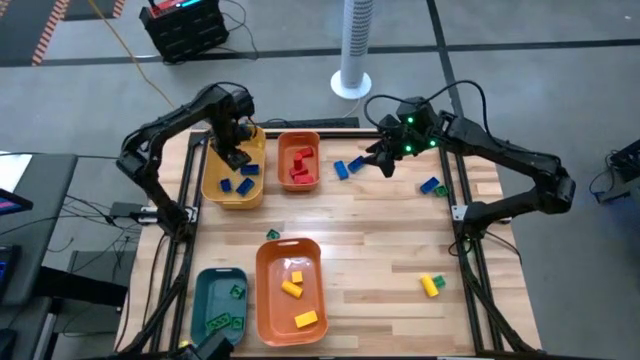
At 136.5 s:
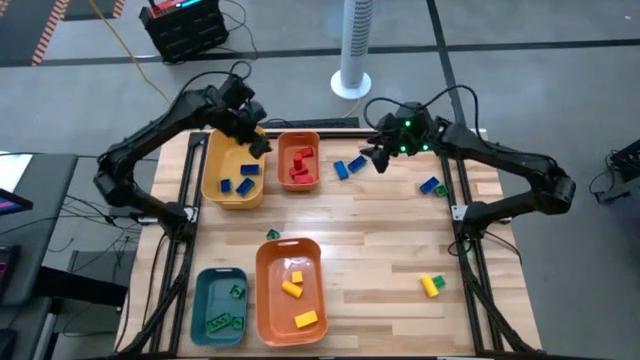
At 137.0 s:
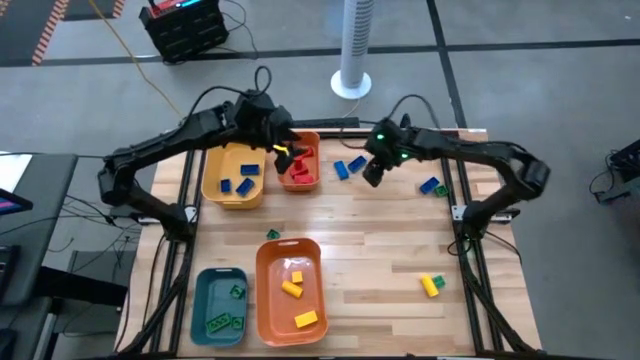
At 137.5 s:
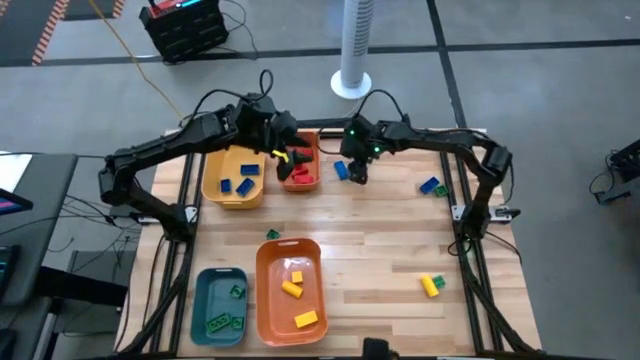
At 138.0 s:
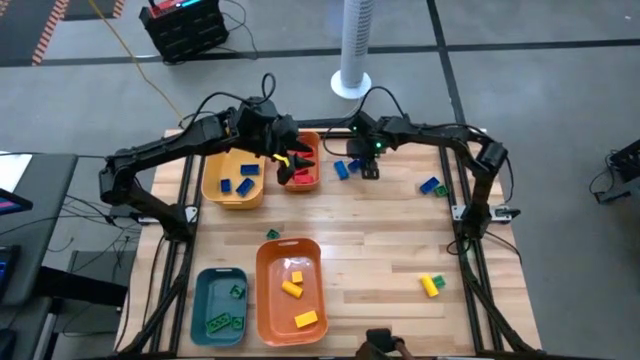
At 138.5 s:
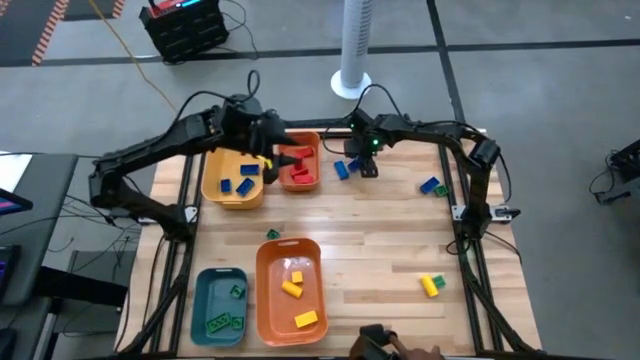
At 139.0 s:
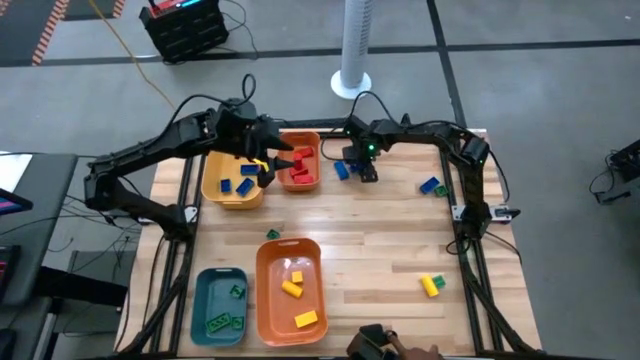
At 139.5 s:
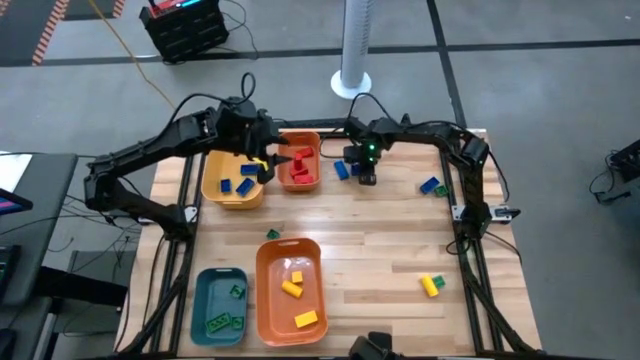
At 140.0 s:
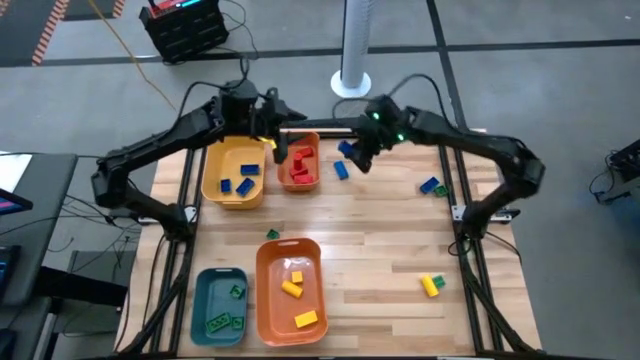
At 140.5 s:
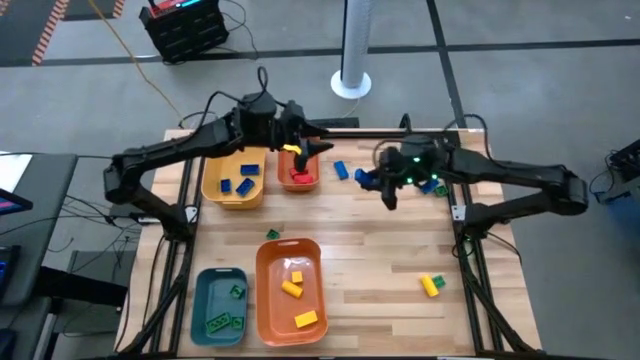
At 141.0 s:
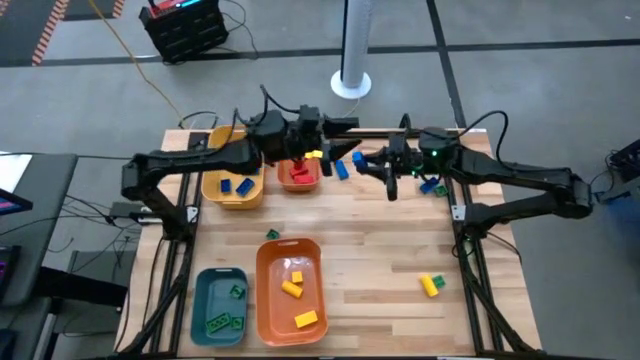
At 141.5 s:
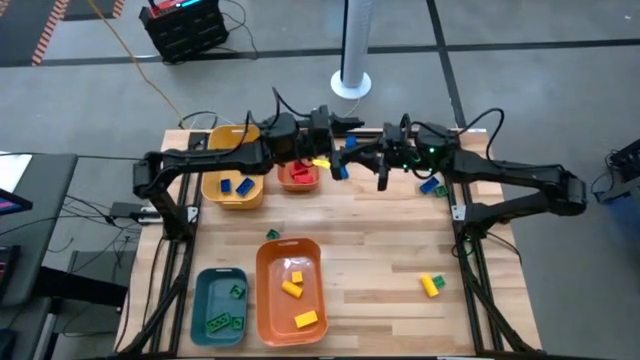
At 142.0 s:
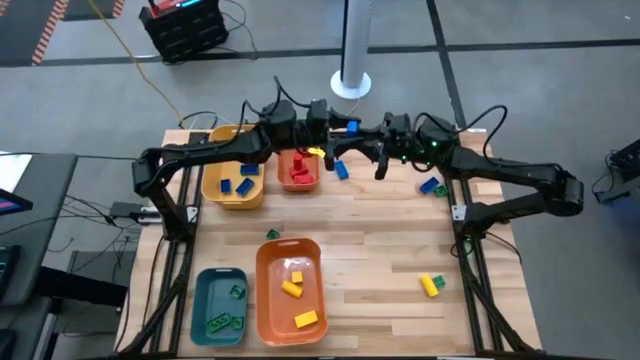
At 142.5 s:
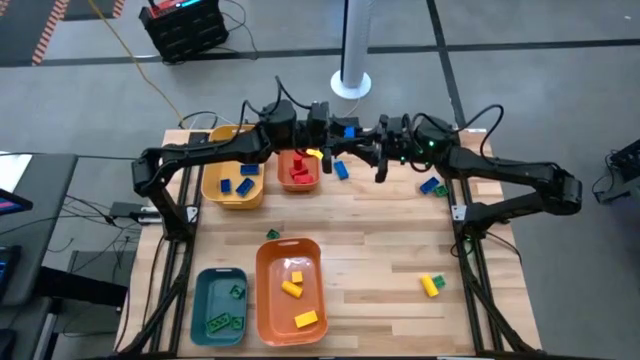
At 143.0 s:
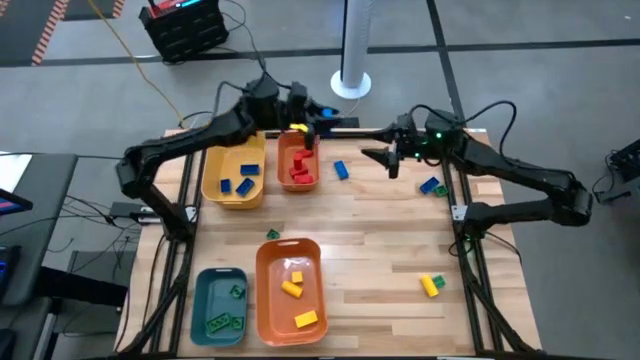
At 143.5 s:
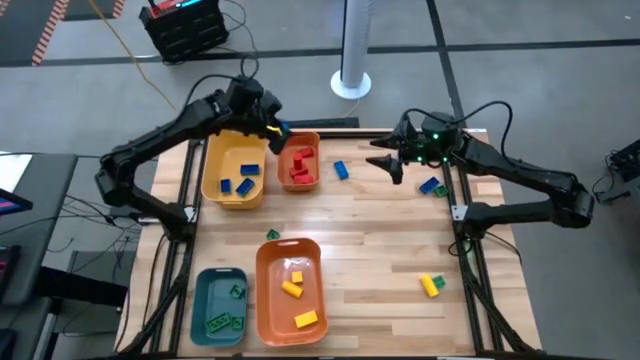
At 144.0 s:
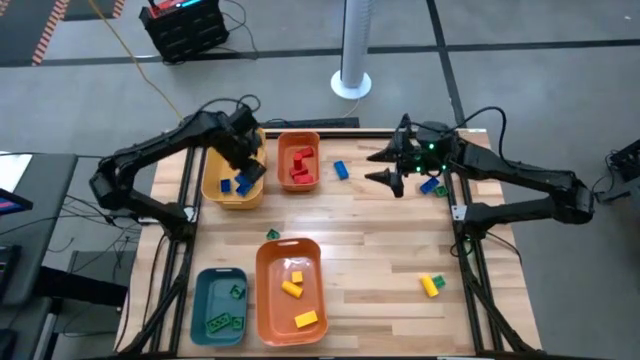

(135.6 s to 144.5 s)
Task: Sort blocks
Put the blue game piece into the yellow bin

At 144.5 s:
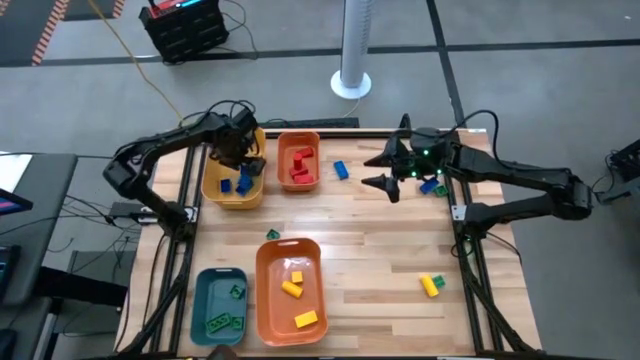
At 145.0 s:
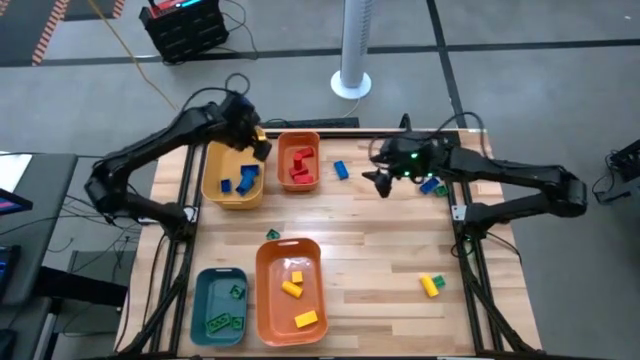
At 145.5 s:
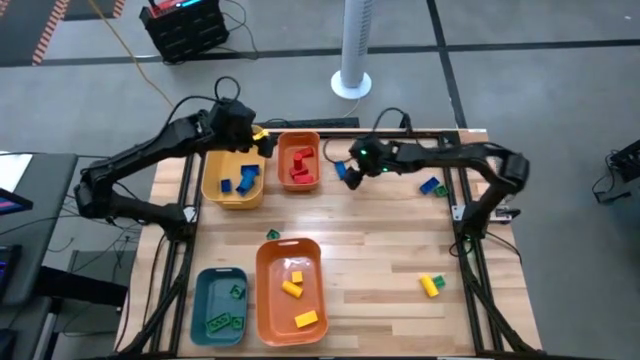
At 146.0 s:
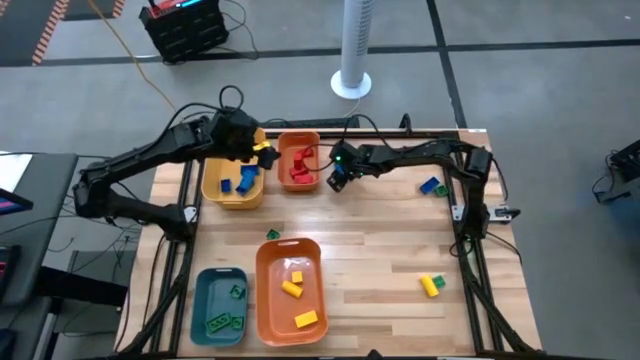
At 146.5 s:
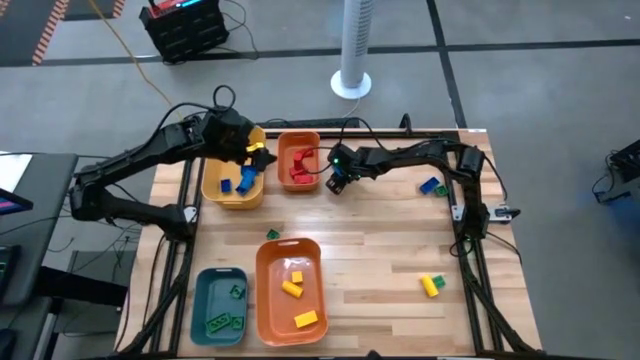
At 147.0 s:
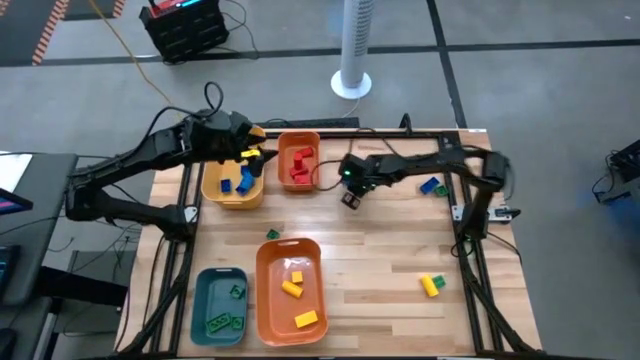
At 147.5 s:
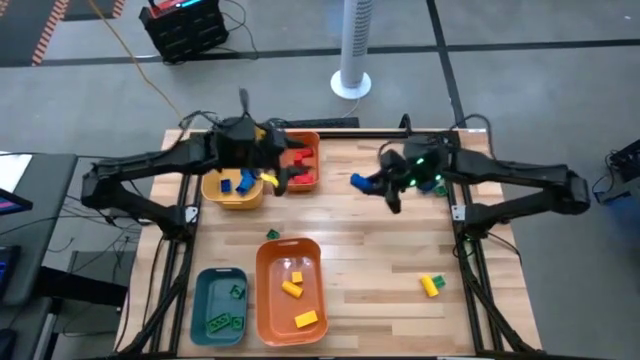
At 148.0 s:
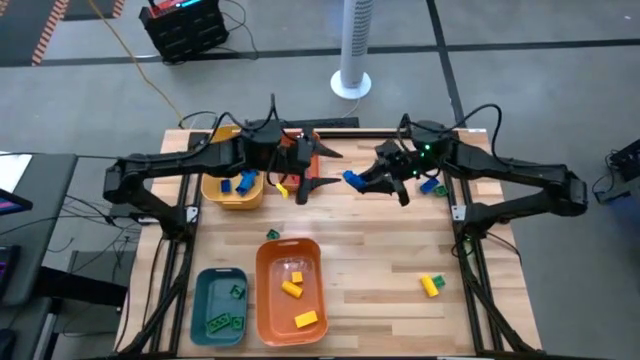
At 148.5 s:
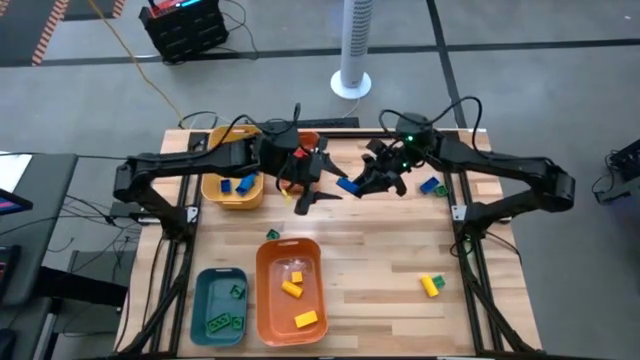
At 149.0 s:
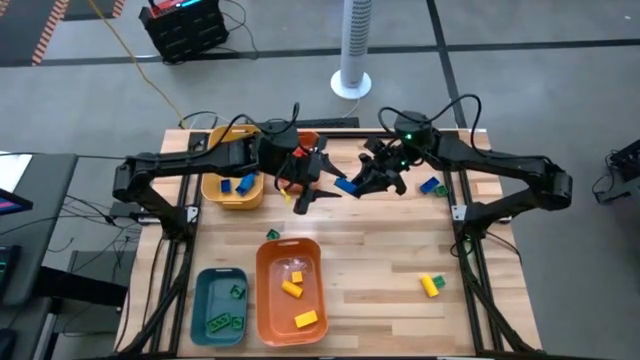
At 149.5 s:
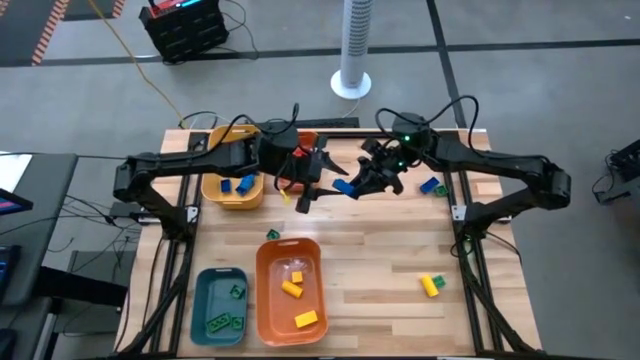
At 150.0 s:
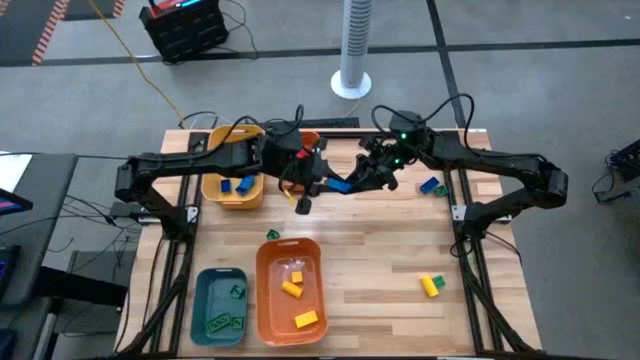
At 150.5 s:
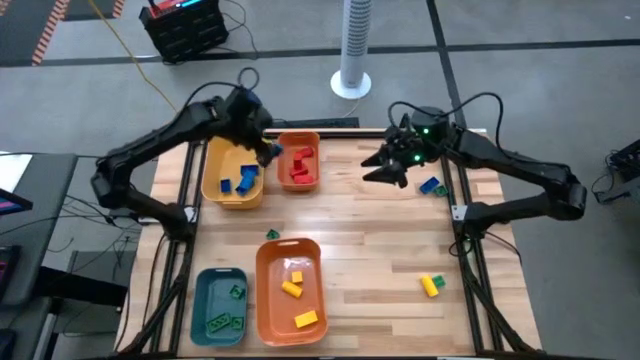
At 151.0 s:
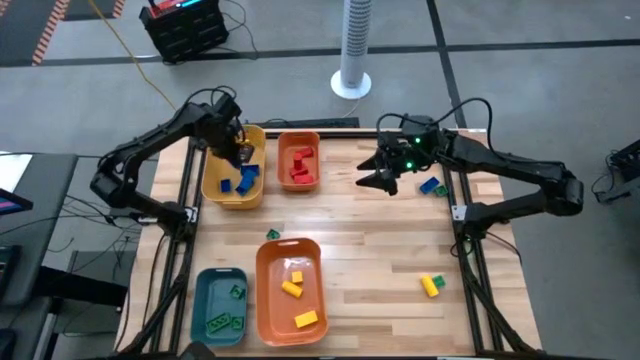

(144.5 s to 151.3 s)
Put the blue game piece into the yellow bin

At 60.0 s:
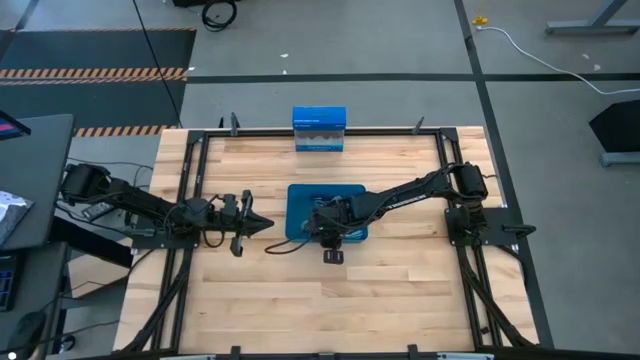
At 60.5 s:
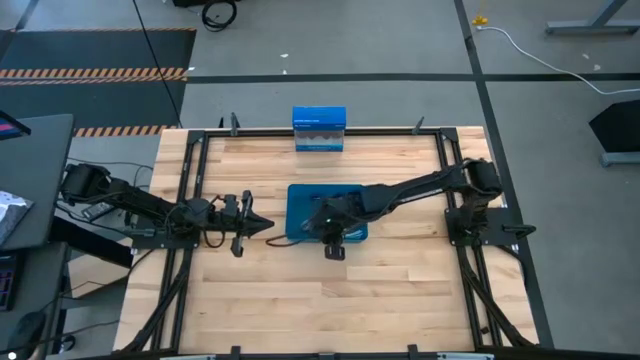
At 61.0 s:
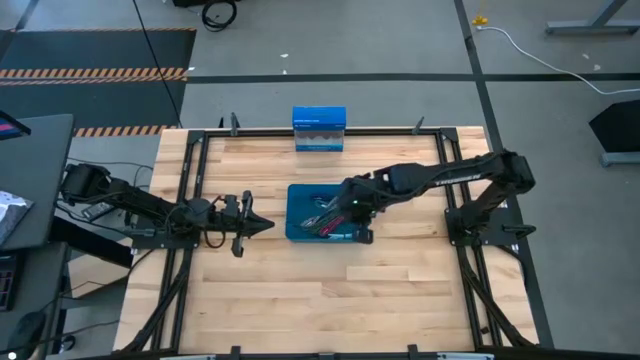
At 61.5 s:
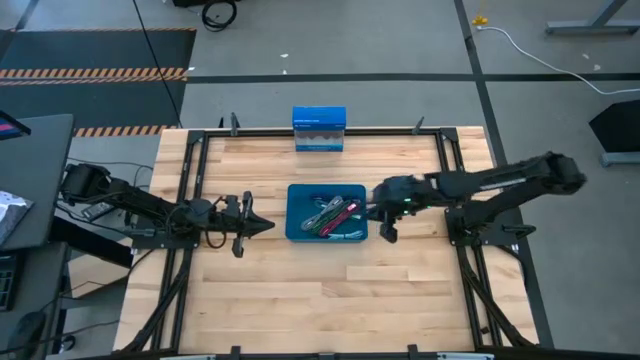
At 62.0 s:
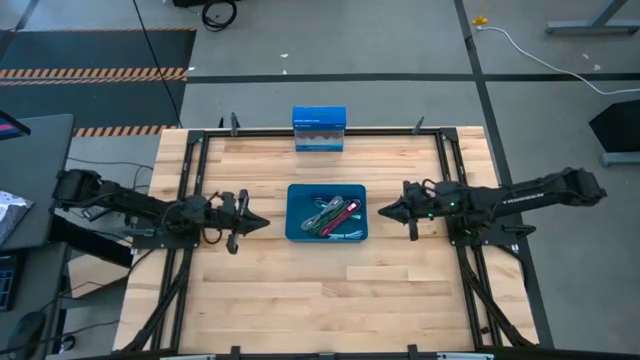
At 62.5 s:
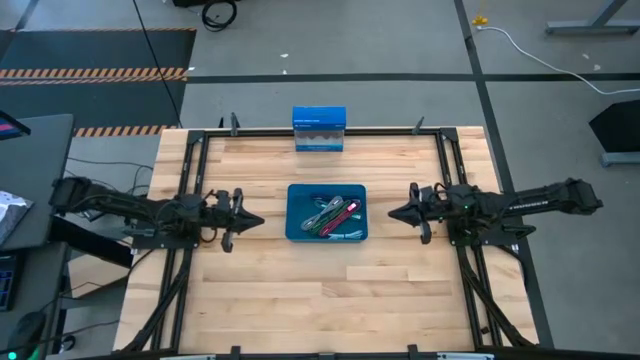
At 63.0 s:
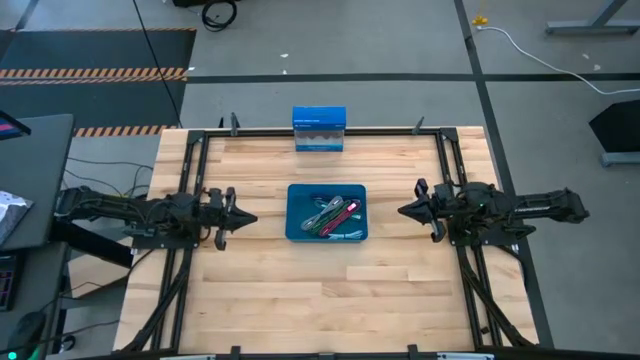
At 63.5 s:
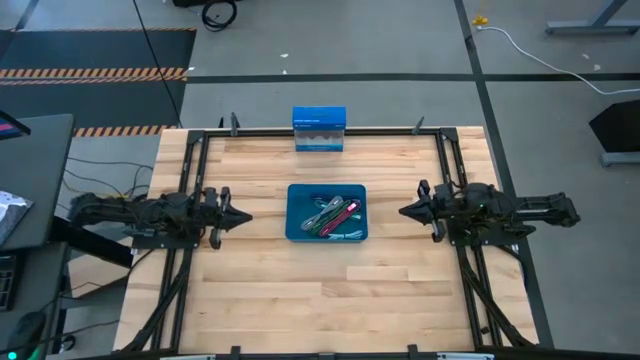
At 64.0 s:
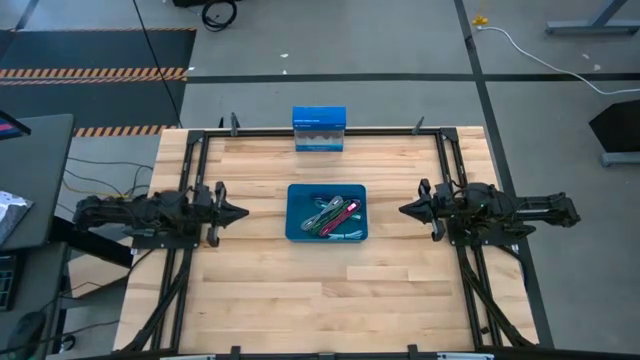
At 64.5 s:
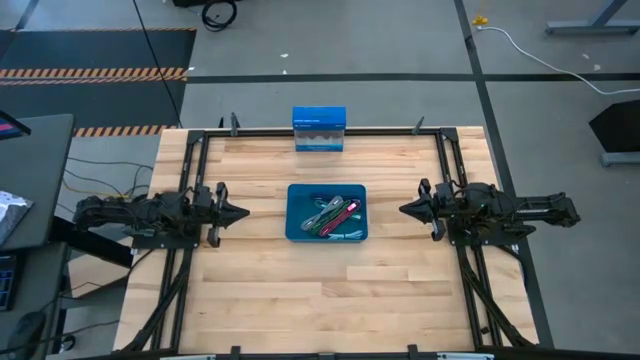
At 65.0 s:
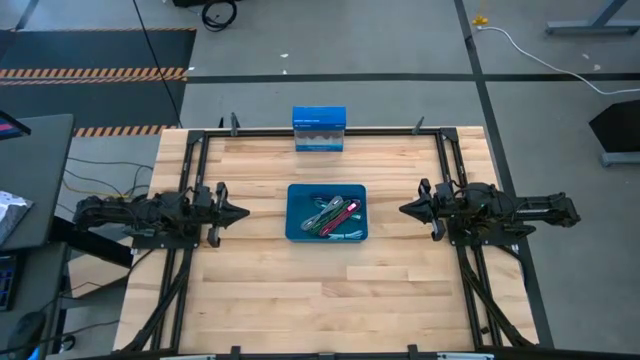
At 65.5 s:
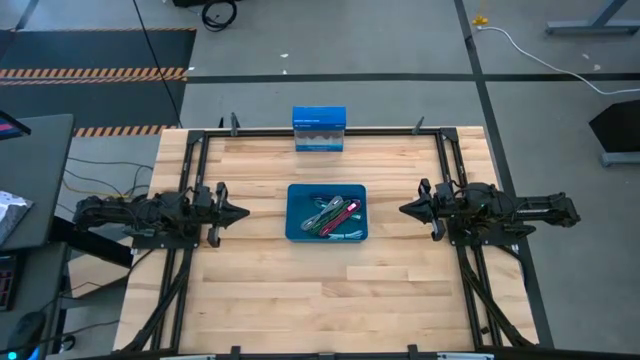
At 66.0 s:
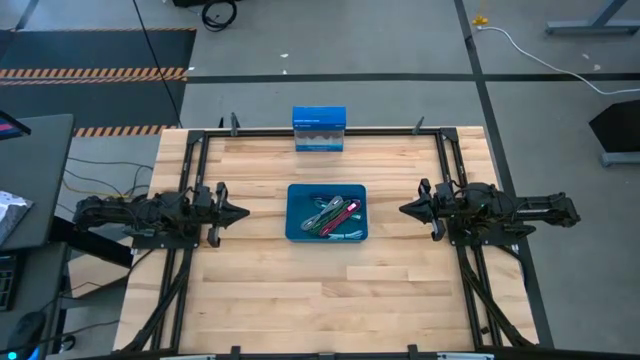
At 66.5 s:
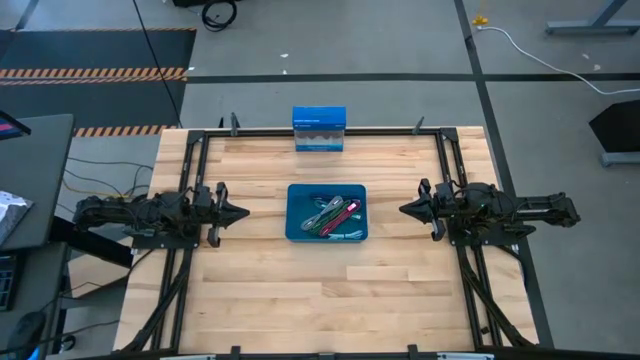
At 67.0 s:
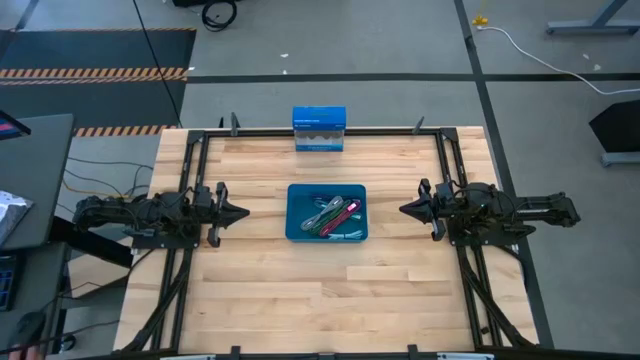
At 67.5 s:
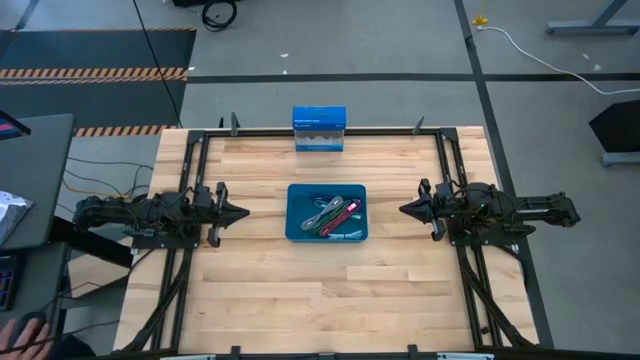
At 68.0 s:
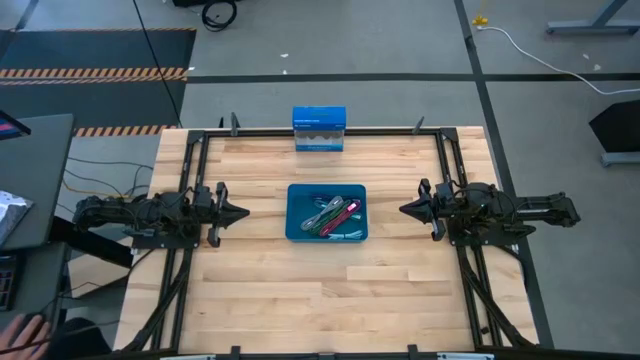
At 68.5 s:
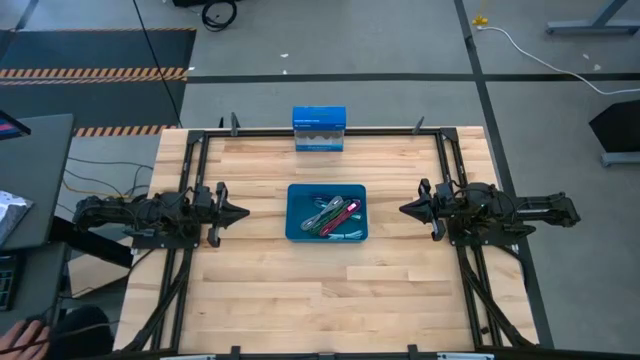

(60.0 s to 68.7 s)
Task: Pick and place USB-C Cables
Return to Home Position
